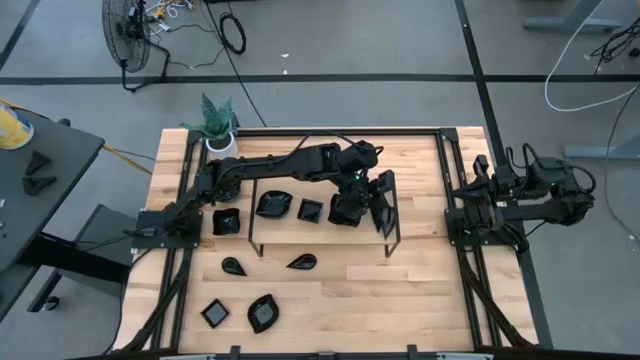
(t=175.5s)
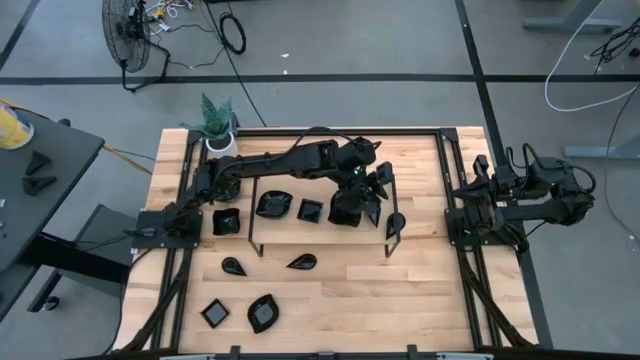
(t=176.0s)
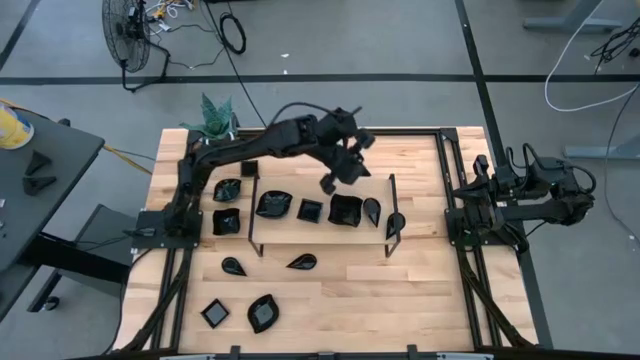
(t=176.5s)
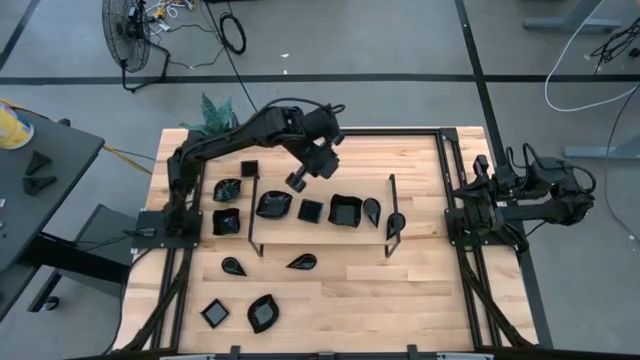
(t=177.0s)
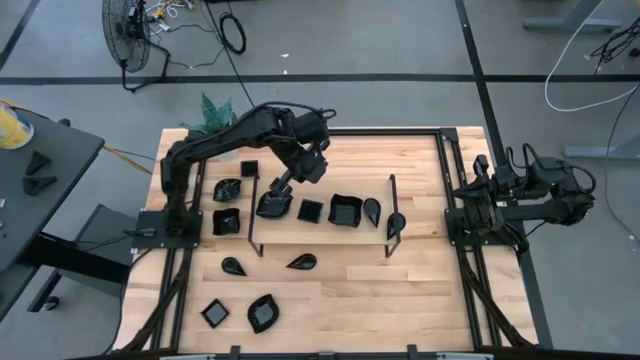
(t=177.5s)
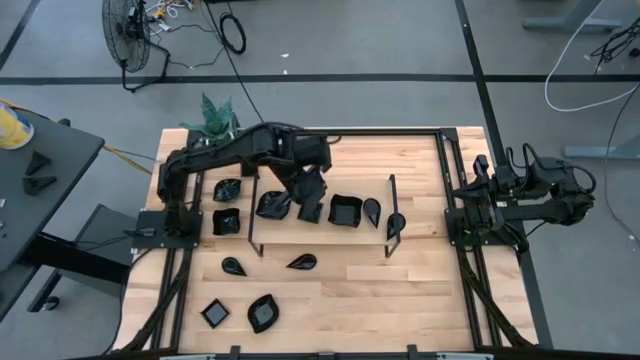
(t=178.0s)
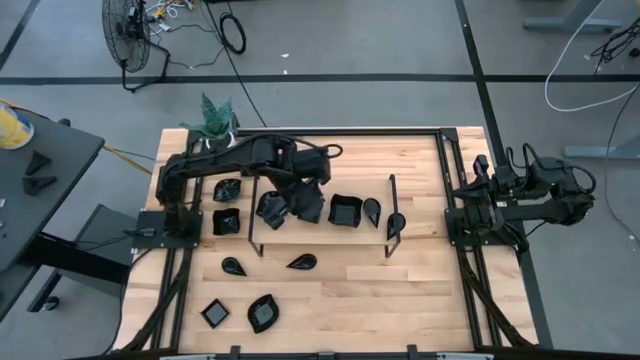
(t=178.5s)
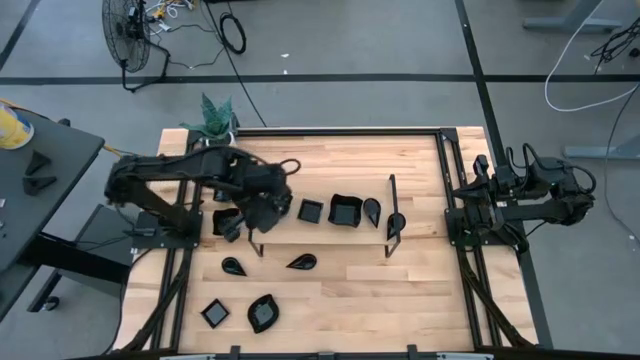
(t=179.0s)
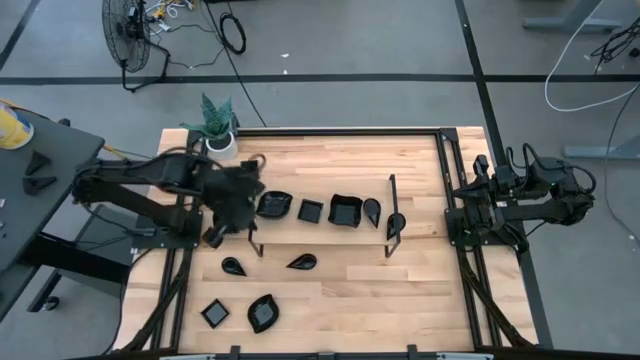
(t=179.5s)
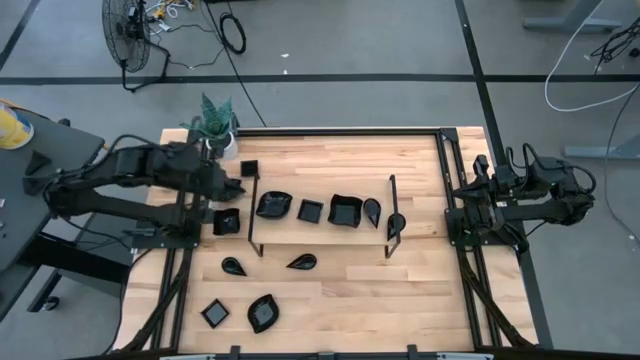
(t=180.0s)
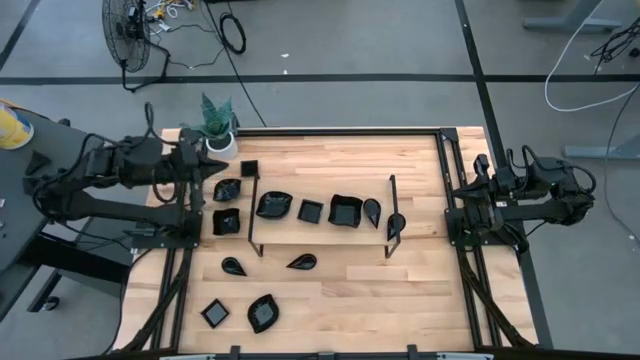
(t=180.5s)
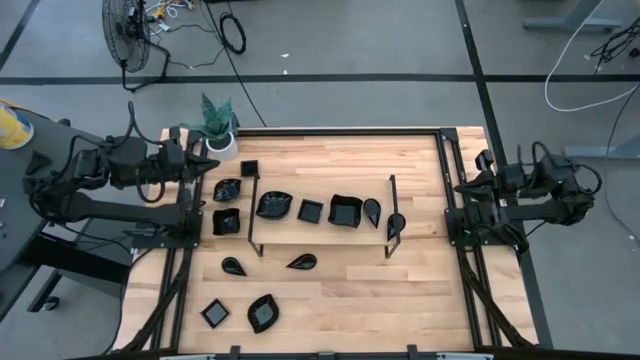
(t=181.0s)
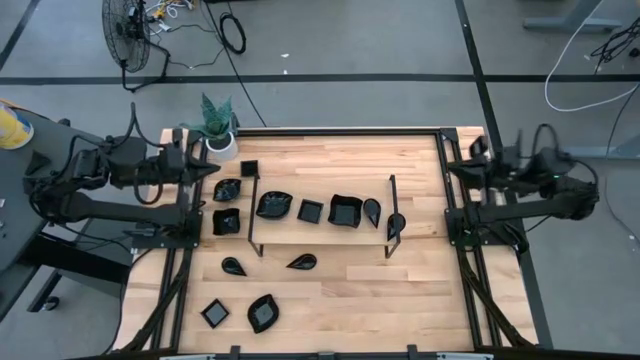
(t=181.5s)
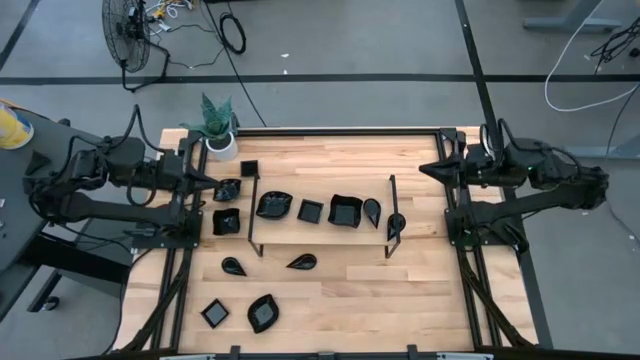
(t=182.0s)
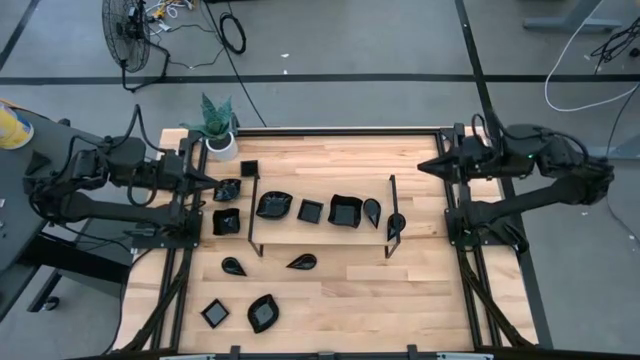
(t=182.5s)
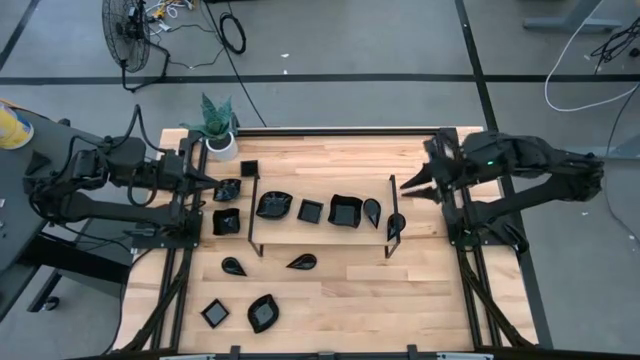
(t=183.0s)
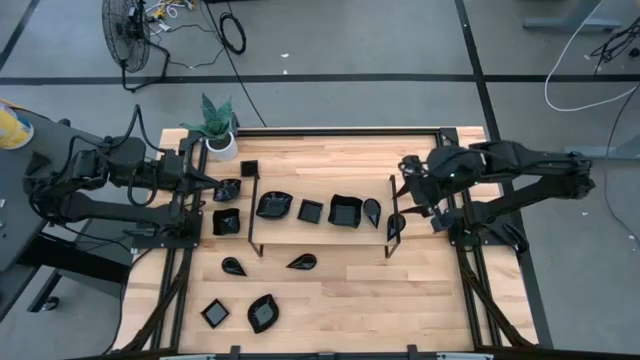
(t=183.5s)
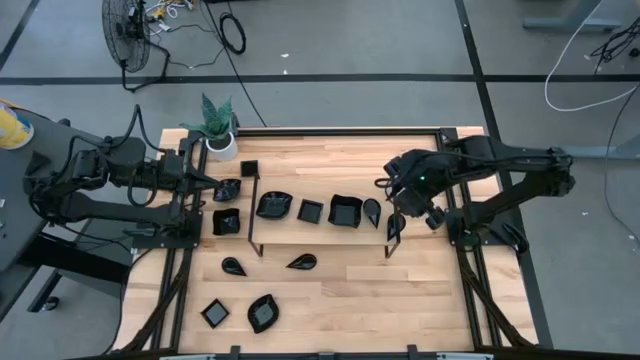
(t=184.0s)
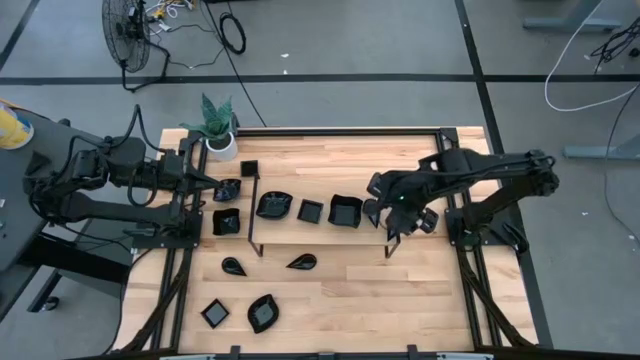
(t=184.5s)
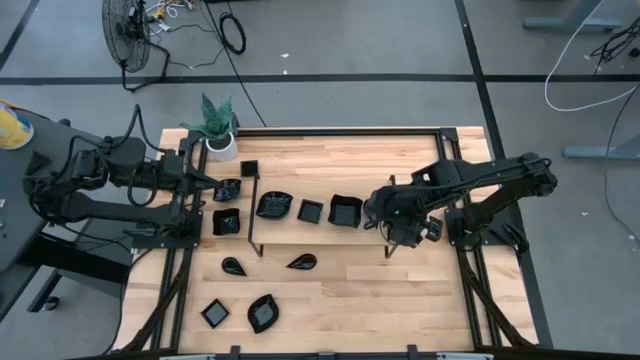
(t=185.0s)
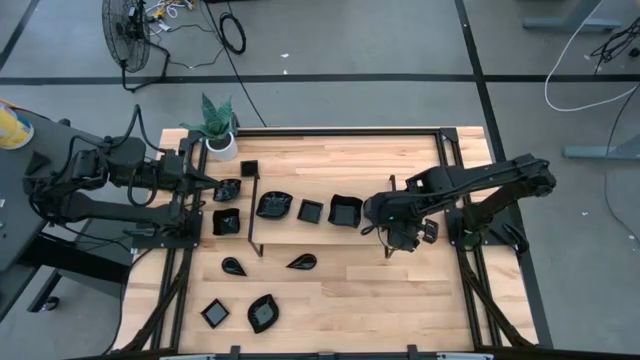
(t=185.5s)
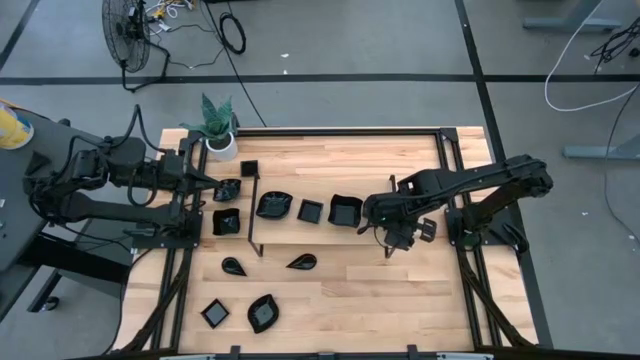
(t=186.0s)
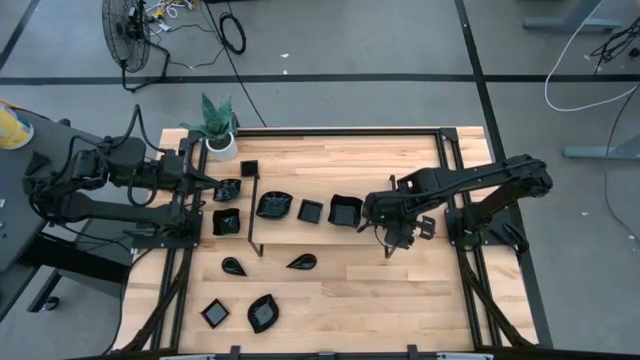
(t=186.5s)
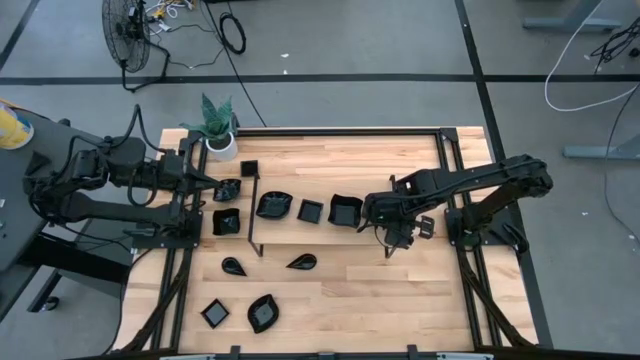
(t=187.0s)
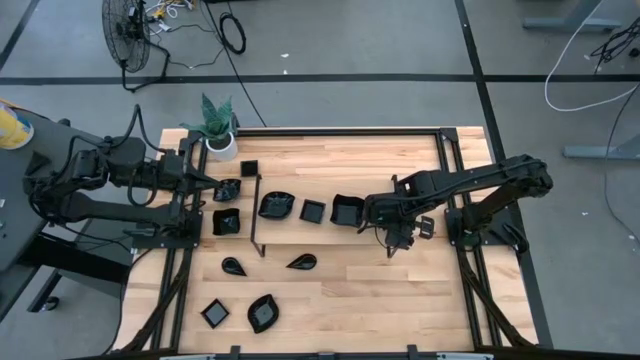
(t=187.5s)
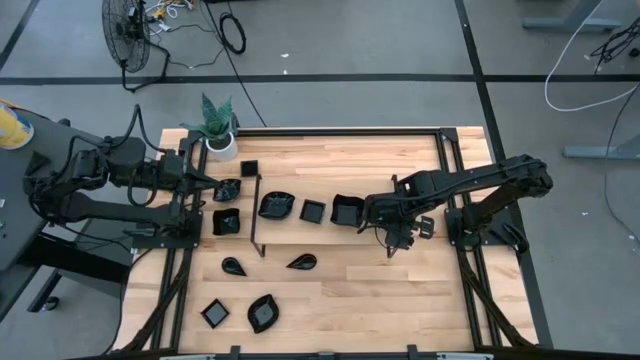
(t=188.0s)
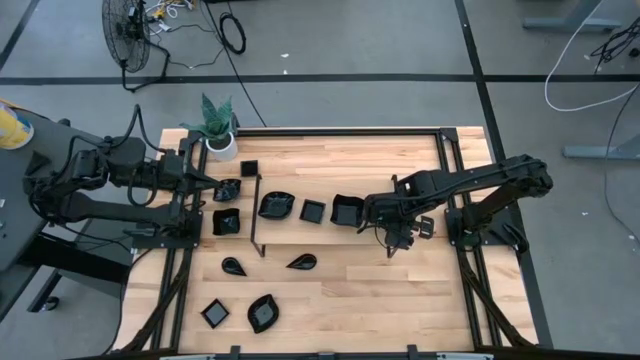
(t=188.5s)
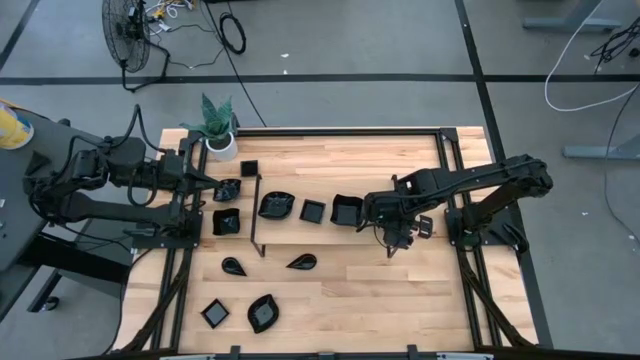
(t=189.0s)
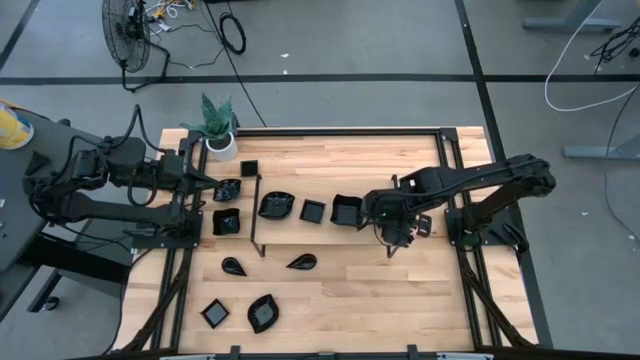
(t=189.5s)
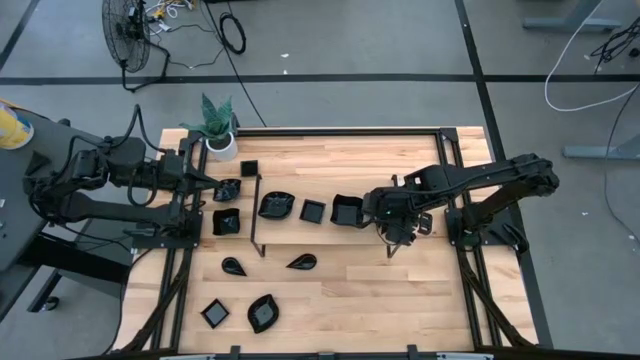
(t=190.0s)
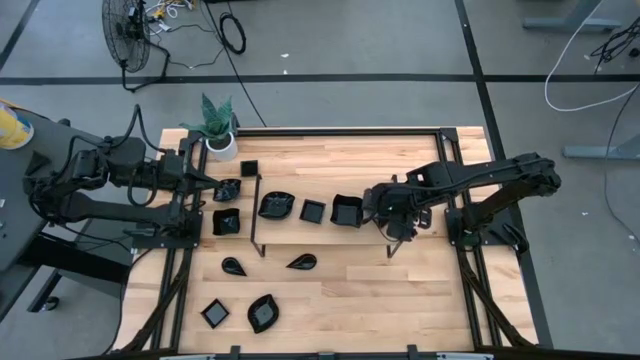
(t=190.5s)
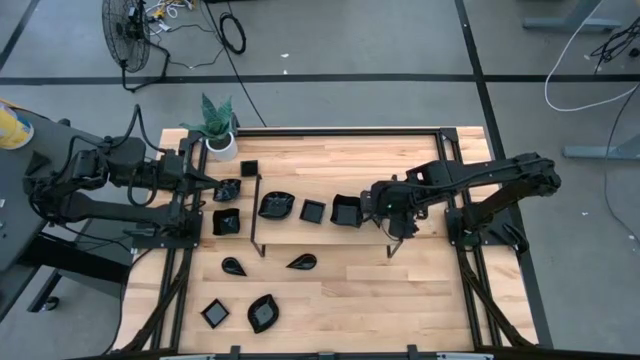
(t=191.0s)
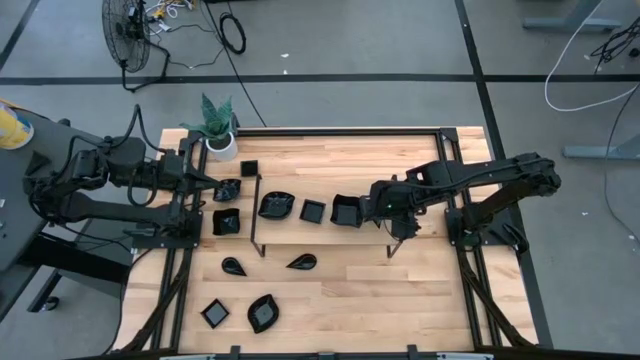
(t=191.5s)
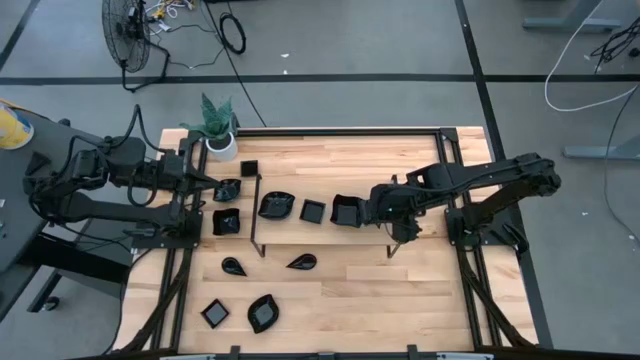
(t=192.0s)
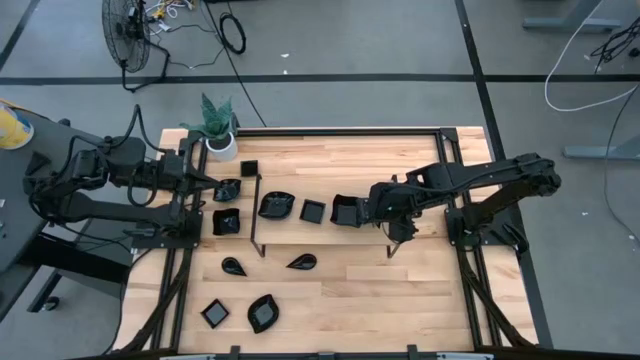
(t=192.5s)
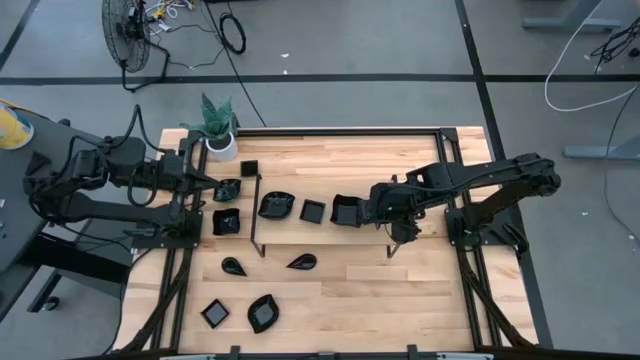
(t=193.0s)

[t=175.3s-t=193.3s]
Task: Pick & Place Mini shaped plates
Stack the drop shaped plate on top of the drop shaped plate on the shelf

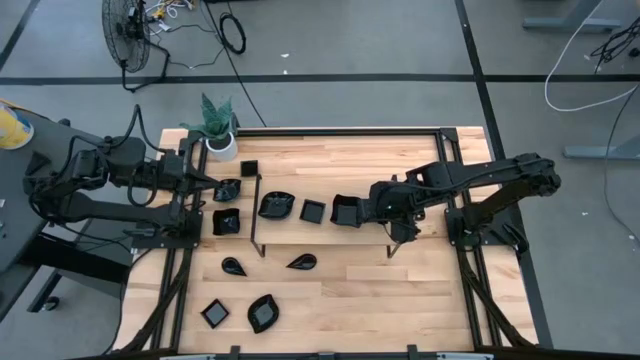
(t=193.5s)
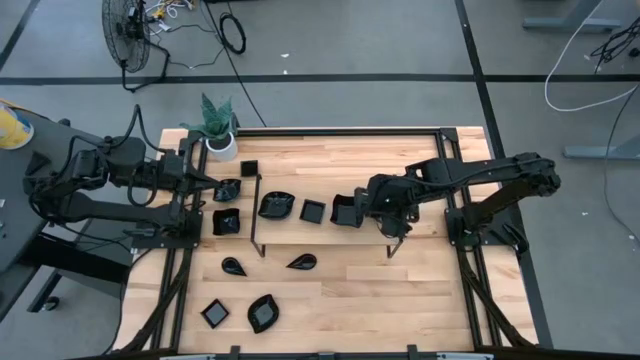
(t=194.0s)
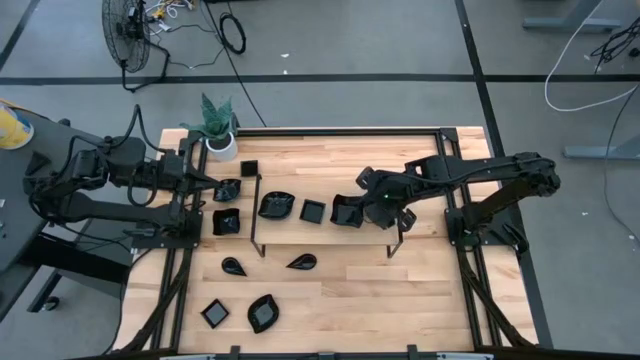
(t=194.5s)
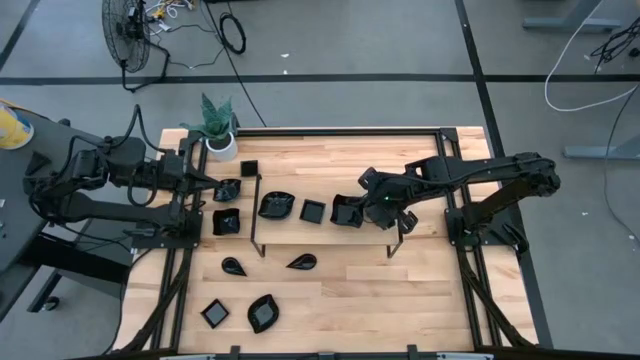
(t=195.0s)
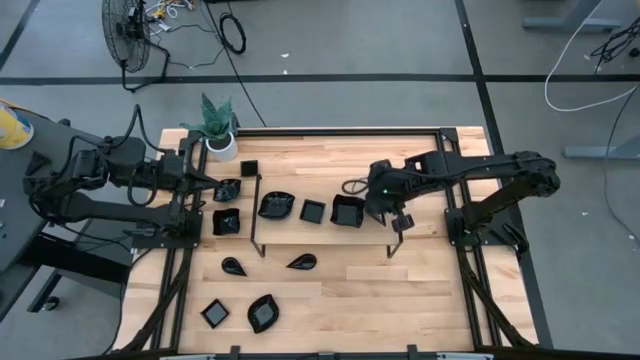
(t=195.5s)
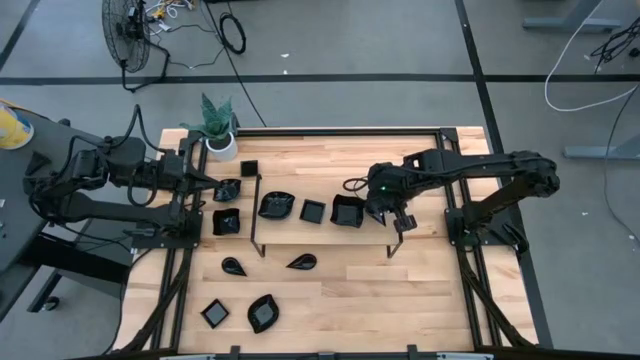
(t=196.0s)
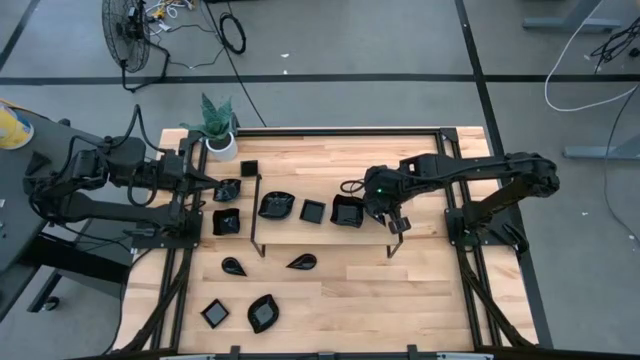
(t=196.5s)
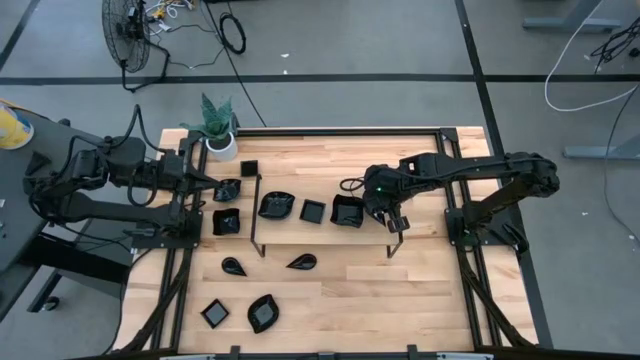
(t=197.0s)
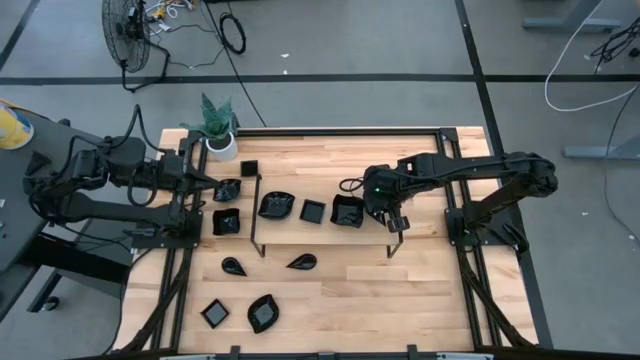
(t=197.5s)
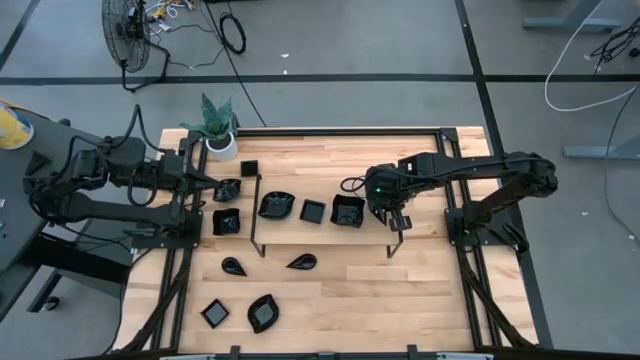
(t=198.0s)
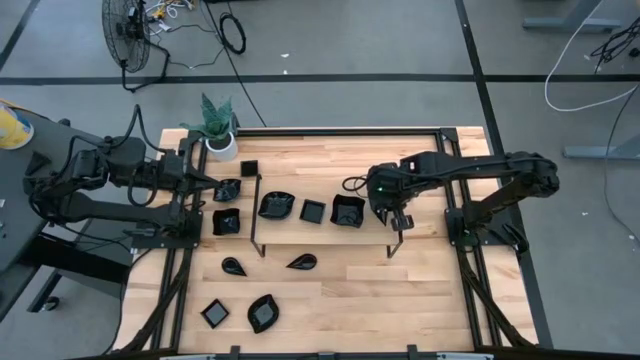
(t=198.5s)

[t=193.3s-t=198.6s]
Adjust the stacked drop shaped plates on the shelf
